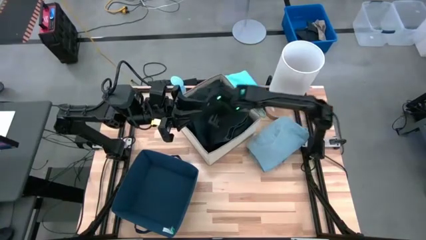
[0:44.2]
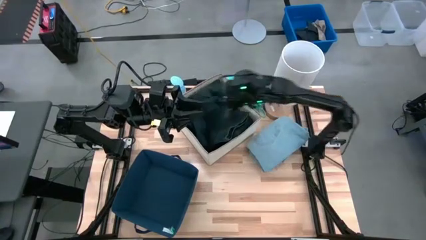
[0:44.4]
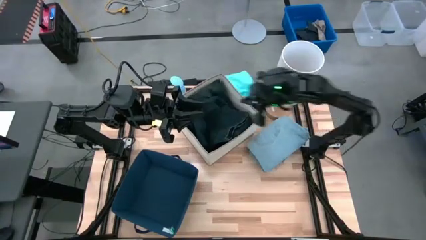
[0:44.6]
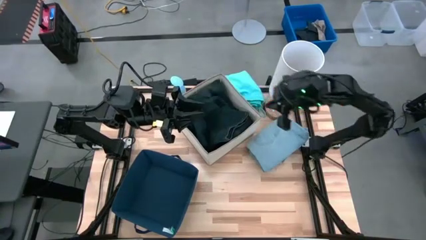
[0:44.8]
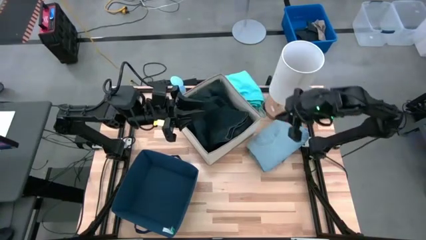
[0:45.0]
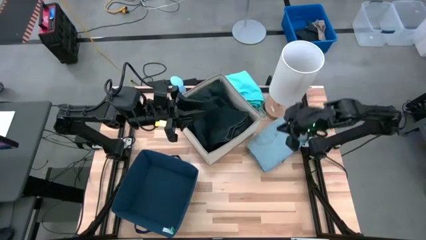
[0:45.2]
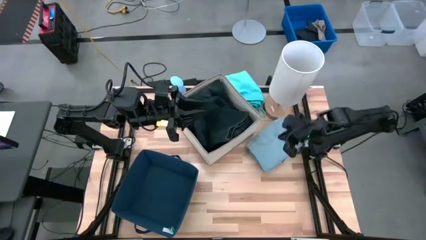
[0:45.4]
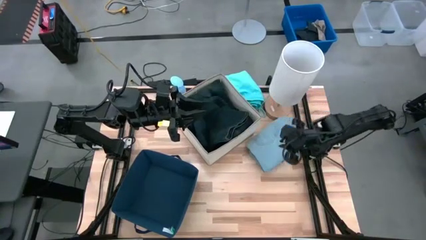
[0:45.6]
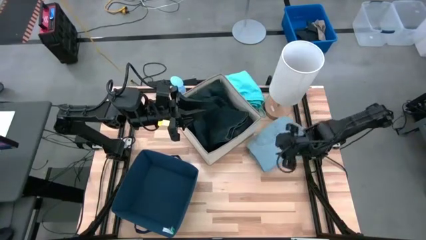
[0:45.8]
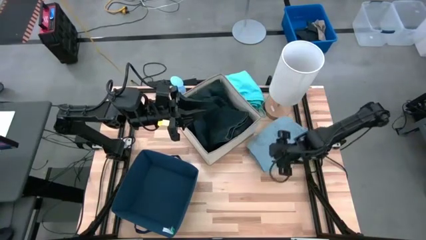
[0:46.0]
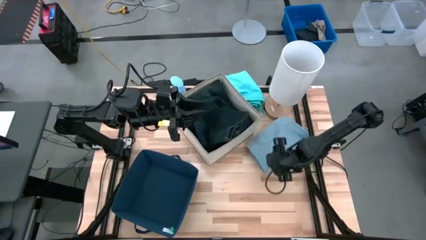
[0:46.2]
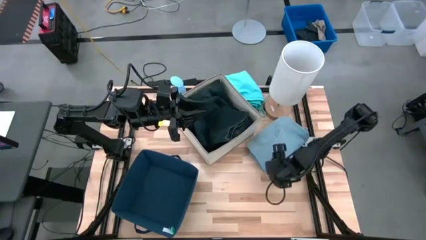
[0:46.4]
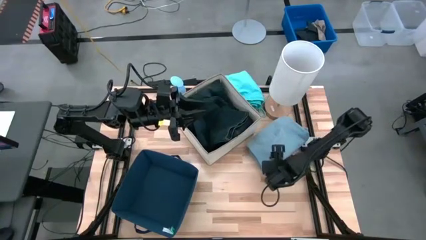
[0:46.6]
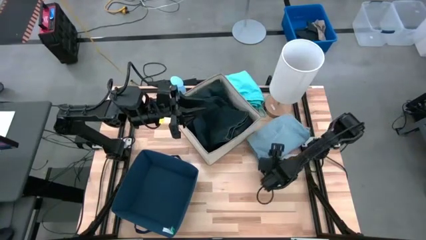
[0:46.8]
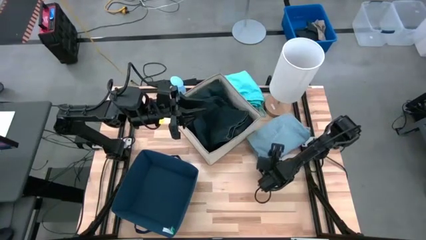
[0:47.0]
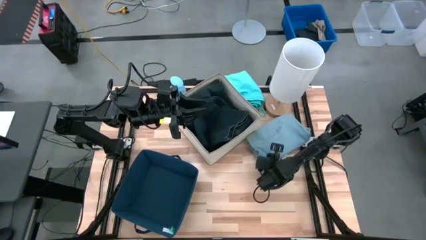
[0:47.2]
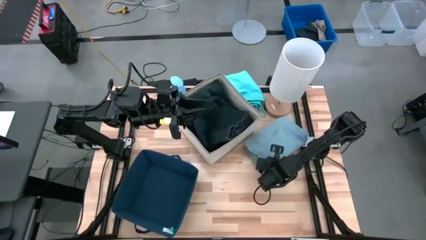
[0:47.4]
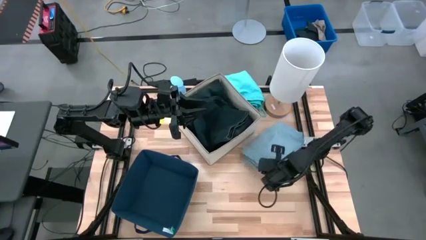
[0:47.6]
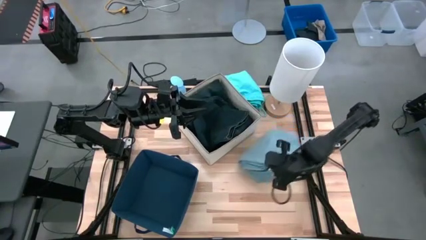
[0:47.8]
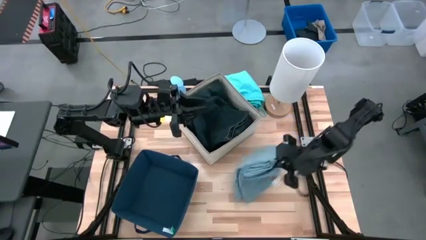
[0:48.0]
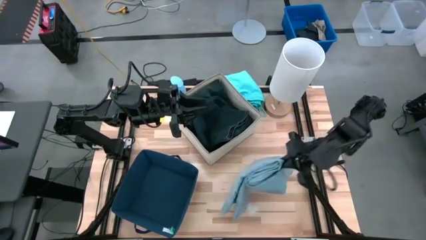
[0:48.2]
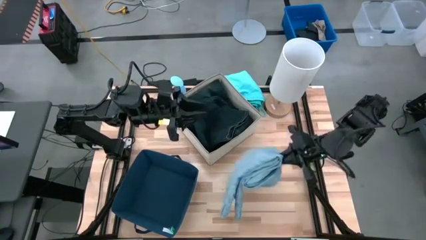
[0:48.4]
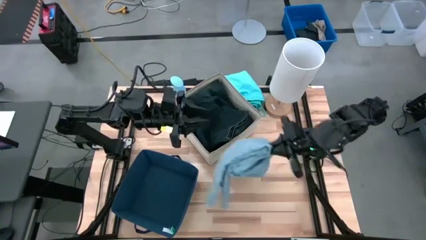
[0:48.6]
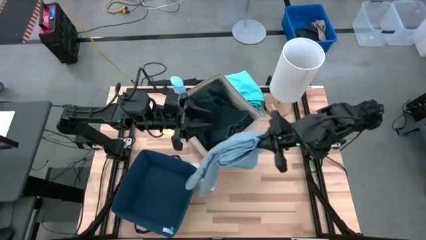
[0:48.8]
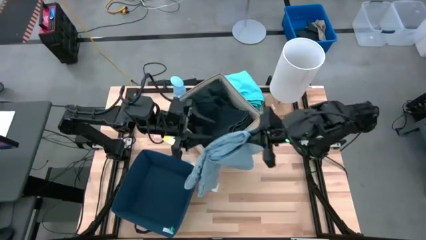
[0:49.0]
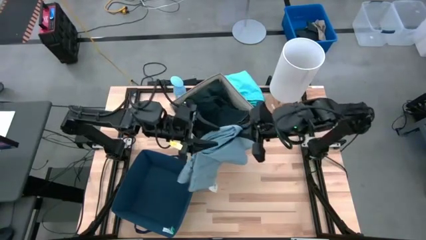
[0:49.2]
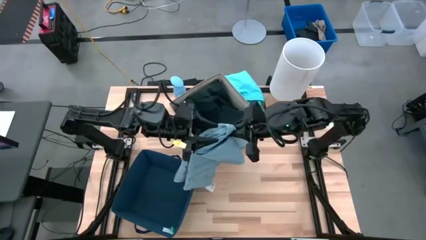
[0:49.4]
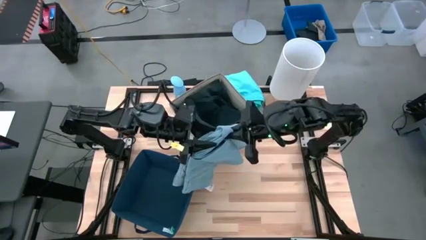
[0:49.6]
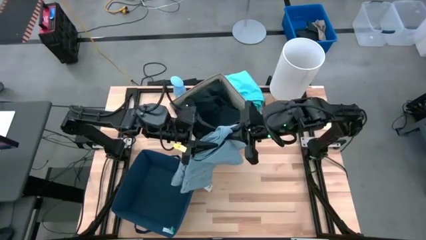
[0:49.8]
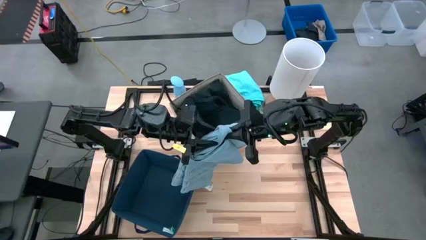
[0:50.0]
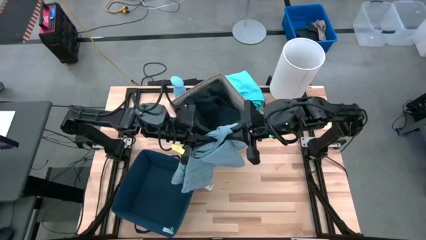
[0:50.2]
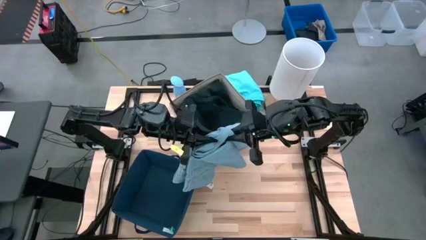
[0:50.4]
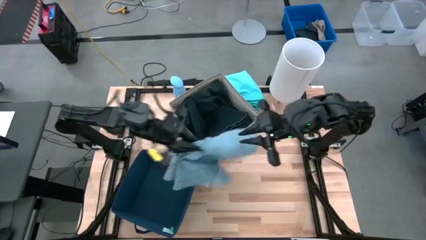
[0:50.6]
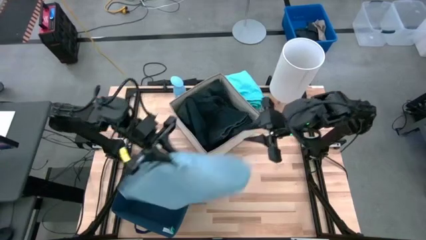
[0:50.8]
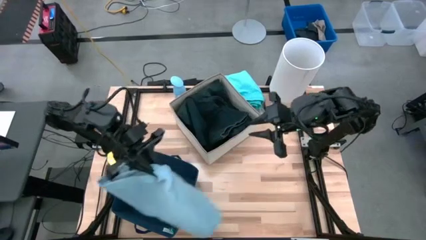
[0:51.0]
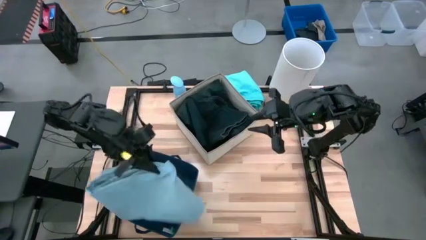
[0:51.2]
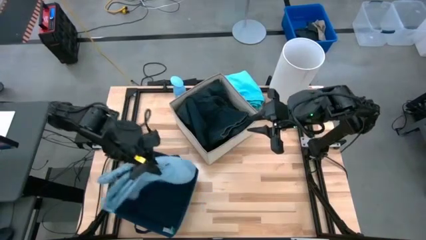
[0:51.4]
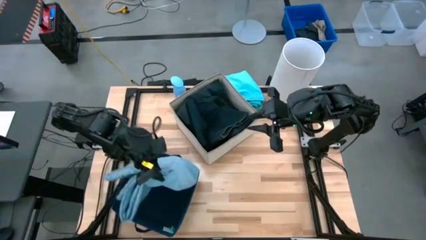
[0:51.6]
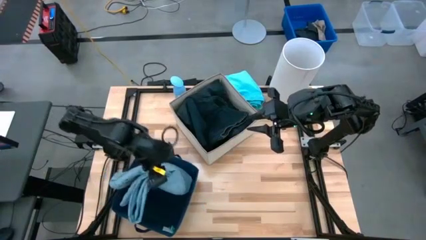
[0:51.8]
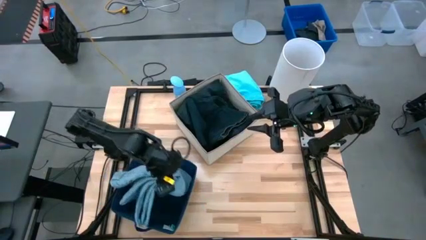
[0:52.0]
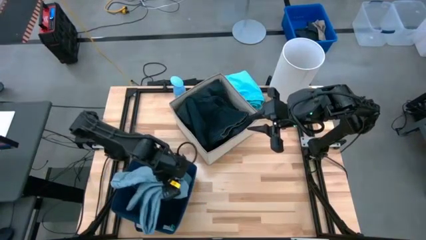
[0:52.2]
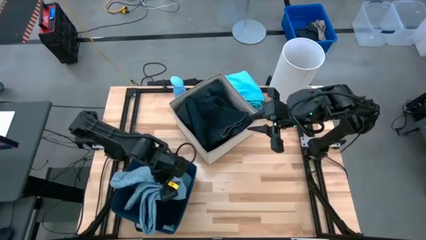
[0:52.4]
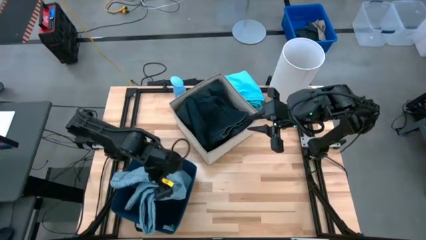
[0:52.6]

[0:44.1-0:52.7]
Task: Sort clothes
Put the blue pants into the blue white laundry organizer

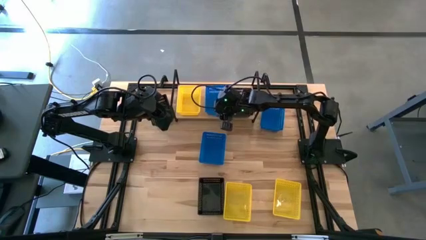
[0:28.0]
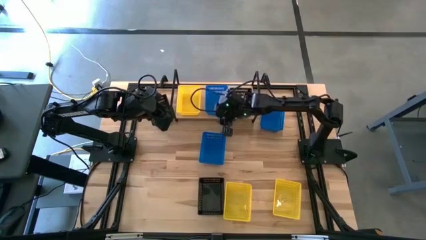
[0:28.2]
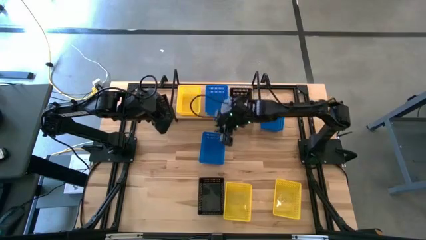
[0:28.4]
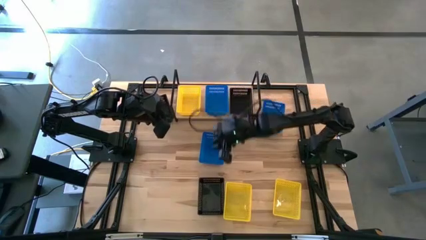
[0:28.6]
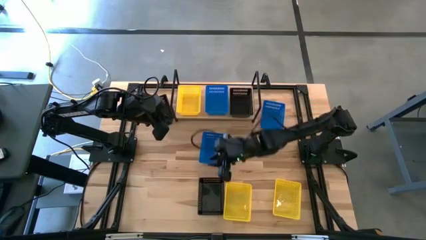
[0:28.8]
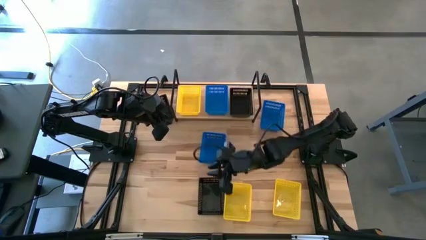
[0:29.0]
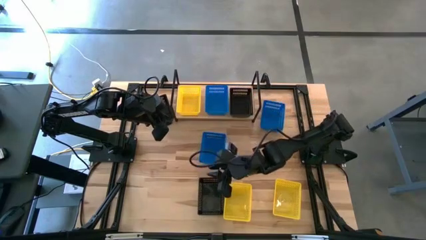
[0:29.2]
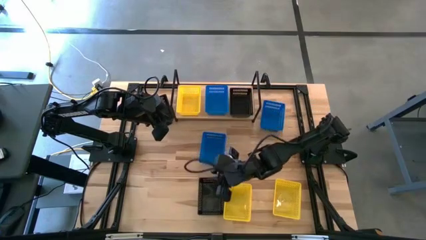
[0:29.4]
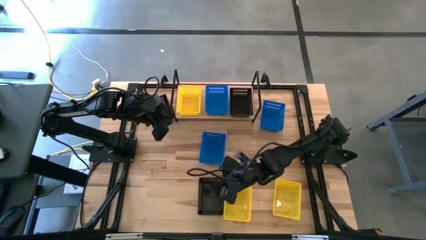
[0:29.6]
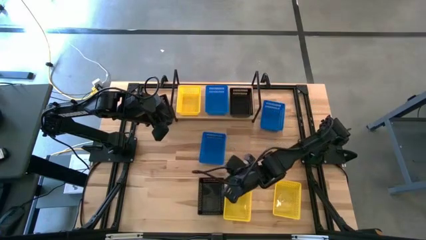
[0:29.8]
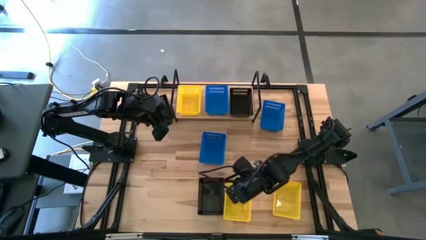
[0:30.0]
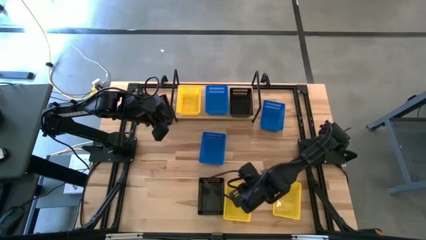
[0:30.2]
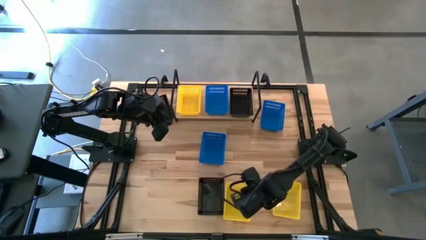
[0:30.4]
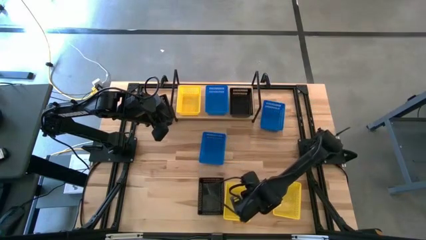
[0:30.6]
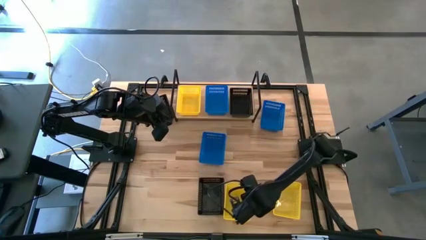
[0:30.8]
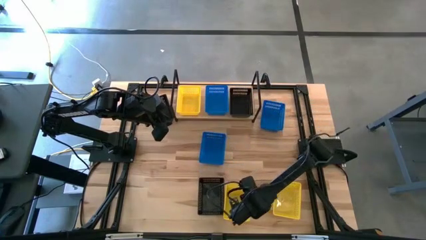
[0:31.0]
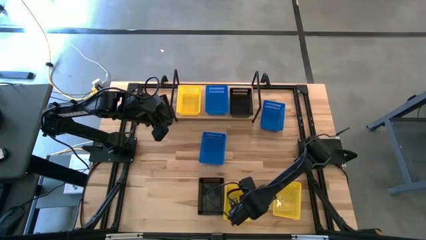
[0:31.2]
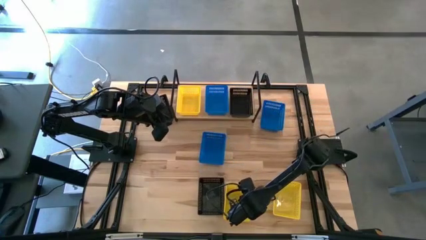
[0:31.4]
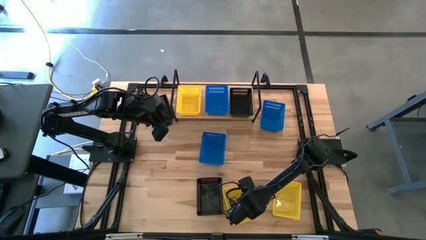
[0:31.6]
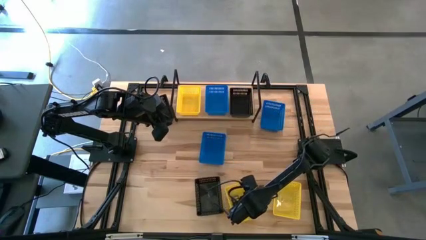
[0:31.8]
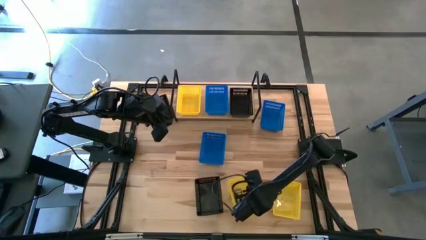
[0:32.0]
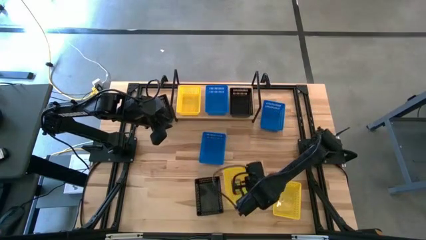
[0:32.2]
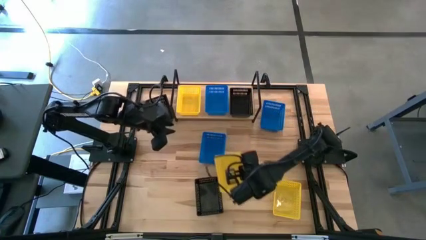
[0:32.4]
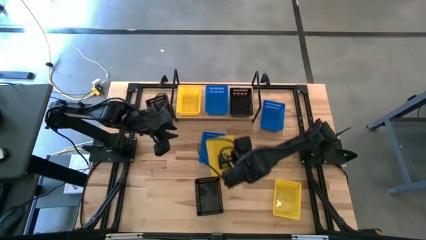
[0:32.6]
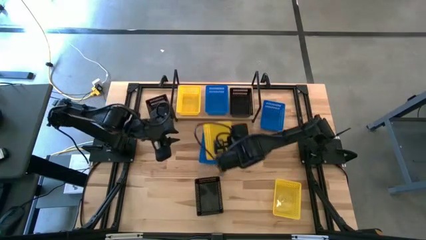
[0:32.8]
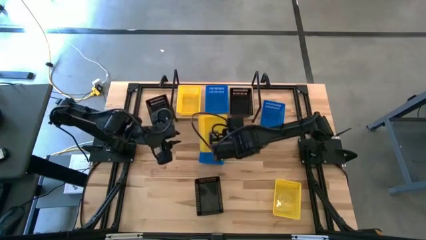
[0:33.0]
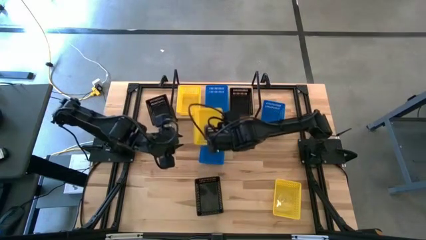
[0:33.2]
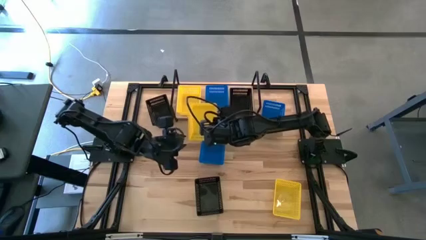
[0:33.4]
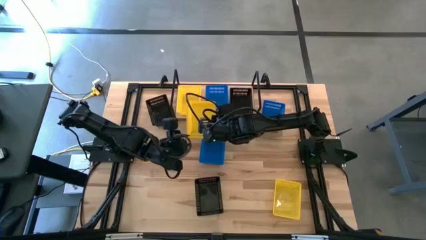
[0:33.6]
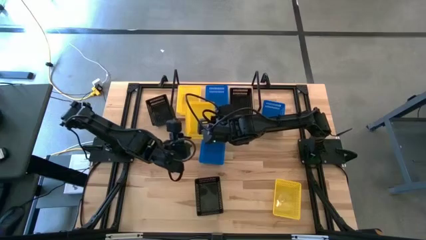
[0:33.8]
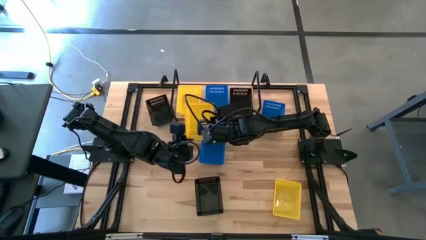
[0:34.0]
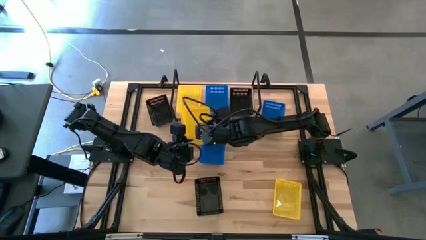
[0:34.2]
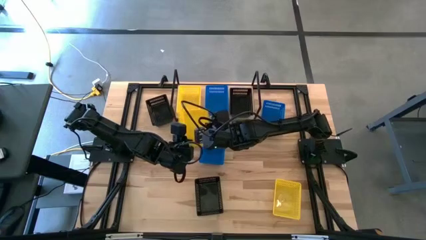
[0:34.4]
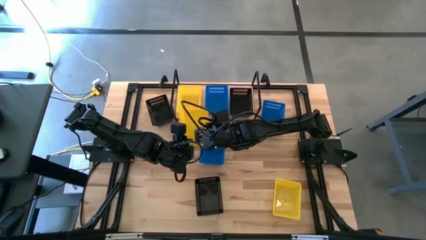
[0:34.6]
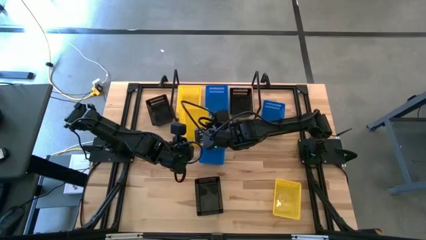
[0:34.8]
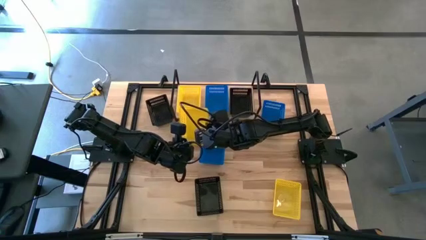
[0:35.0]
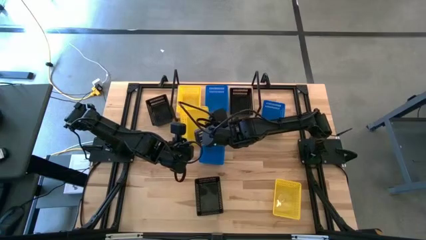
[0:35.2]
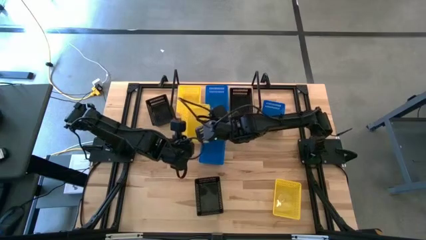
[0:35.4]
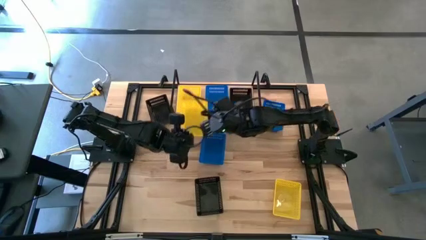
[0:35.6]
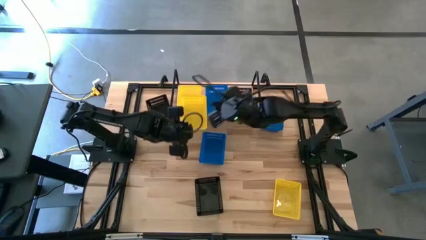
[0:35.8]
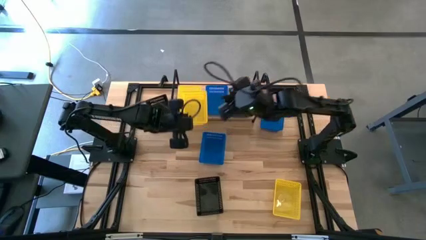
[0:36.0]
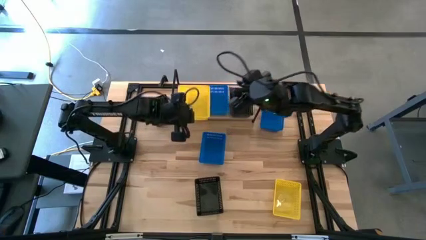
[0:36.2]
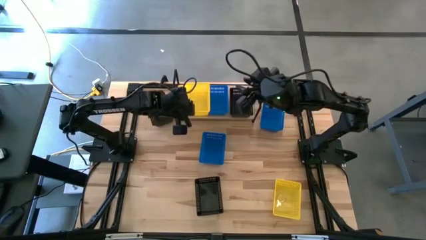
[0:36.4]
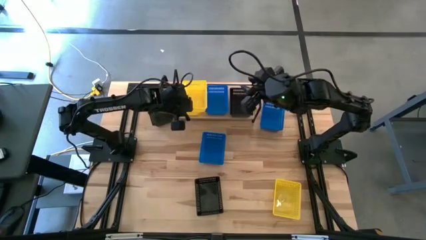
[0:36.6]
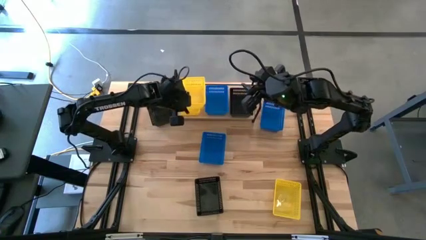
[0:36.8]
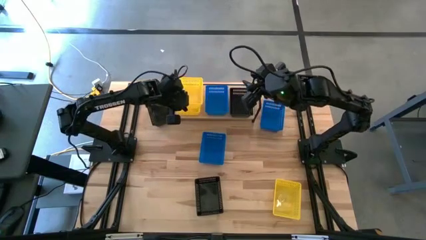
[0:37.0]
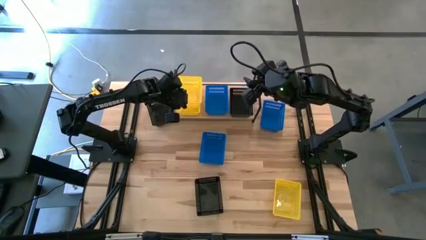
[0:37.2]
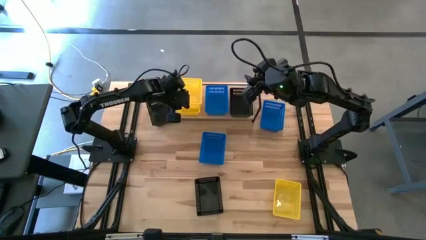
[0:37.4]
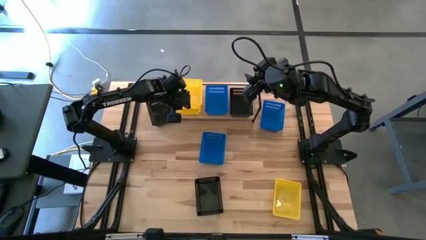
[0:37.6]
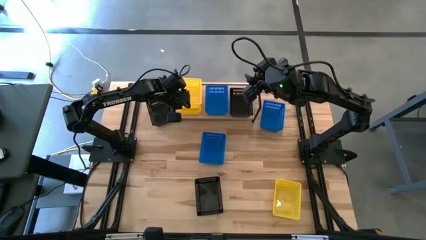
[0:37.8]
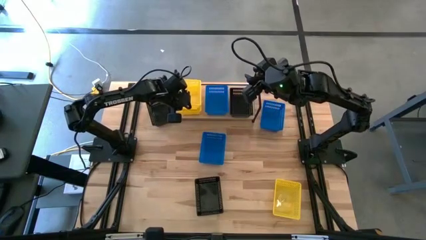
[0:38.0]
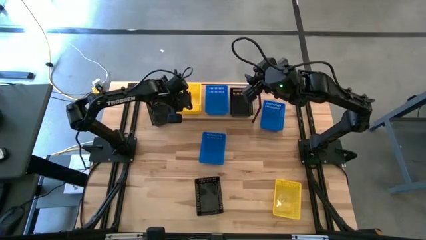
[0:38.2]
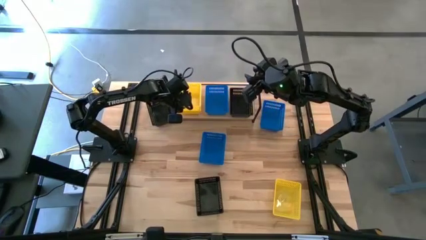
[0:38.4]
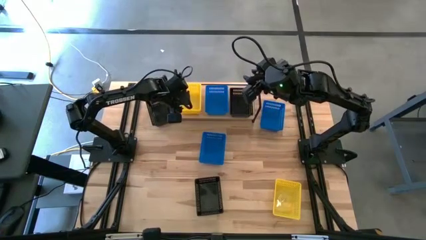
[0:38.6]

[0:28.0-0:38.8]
Task: Stack baskets on shelf by color
Stack the left yellow bin on top of the yellow bin on the shelf
